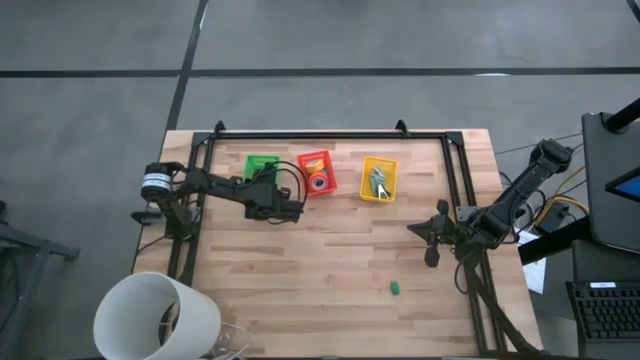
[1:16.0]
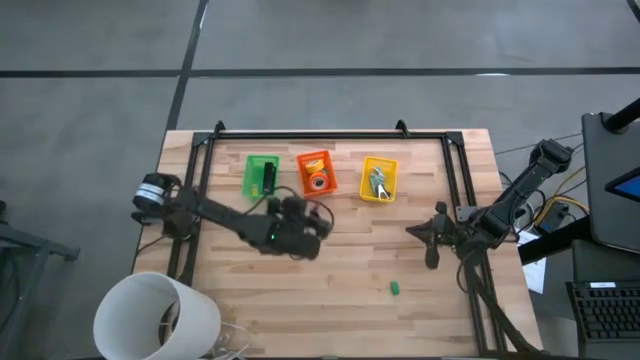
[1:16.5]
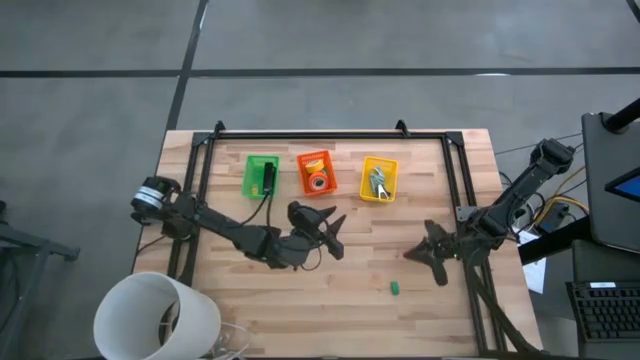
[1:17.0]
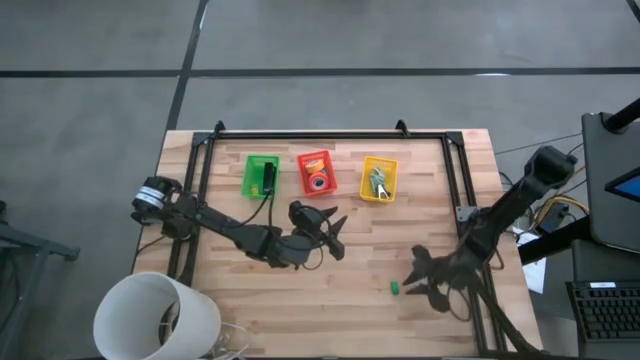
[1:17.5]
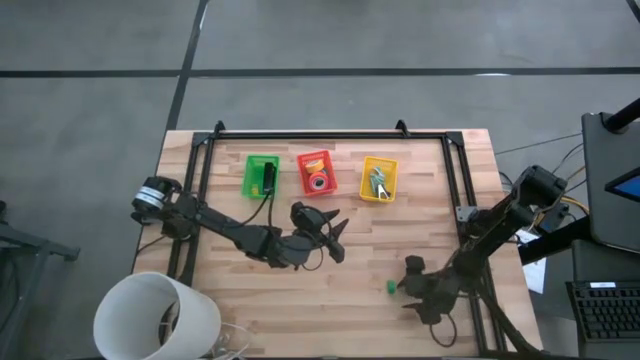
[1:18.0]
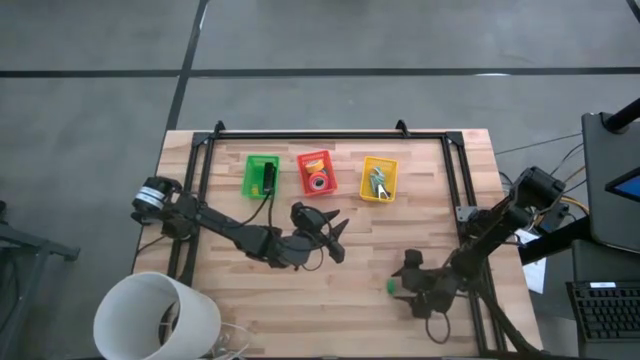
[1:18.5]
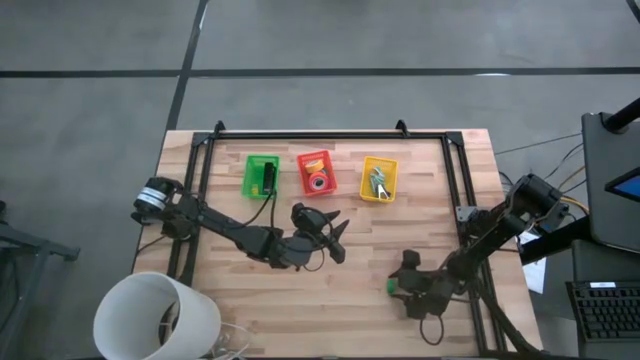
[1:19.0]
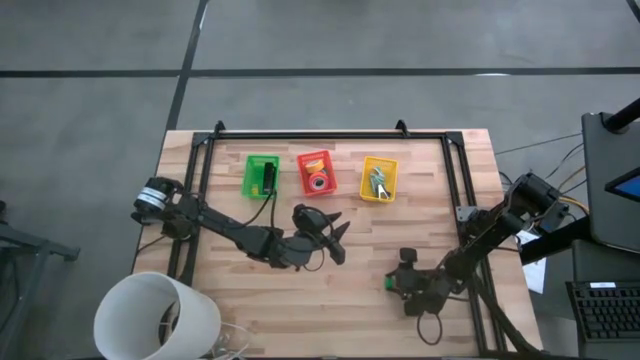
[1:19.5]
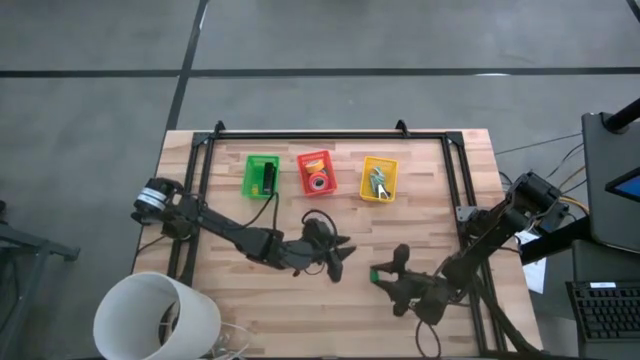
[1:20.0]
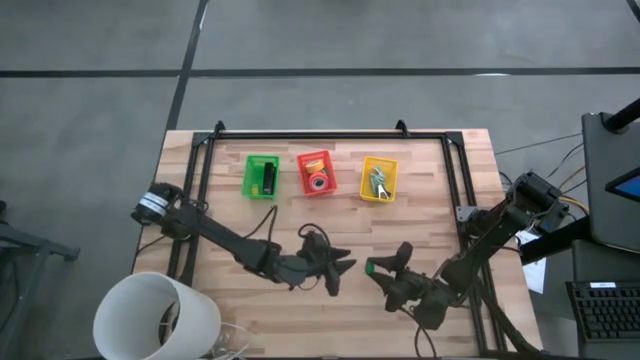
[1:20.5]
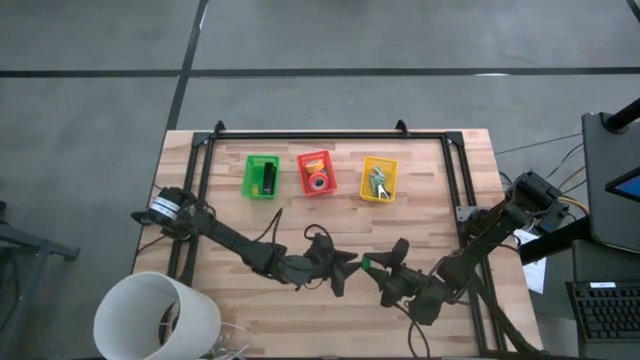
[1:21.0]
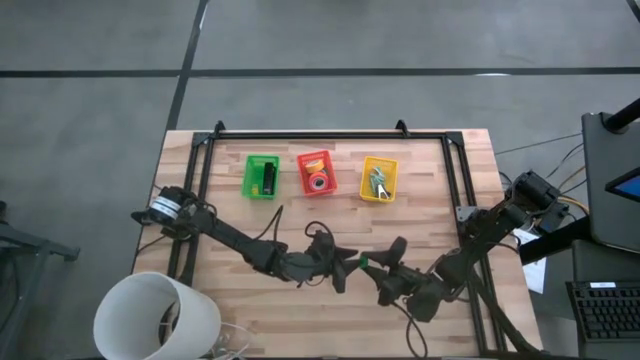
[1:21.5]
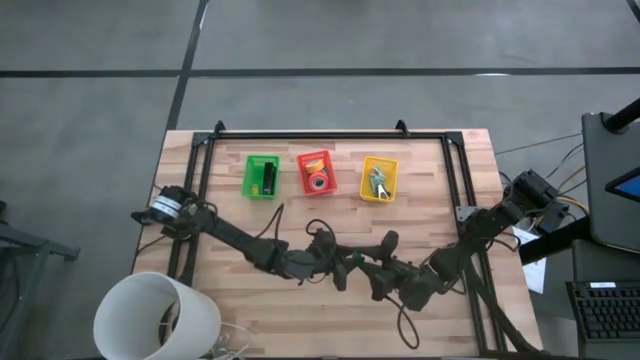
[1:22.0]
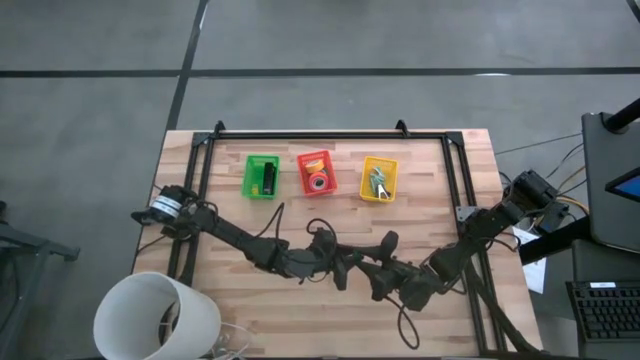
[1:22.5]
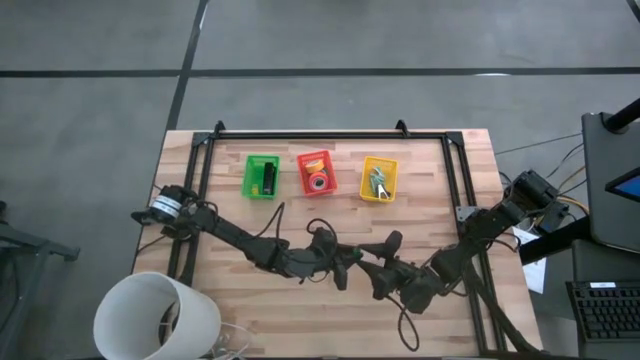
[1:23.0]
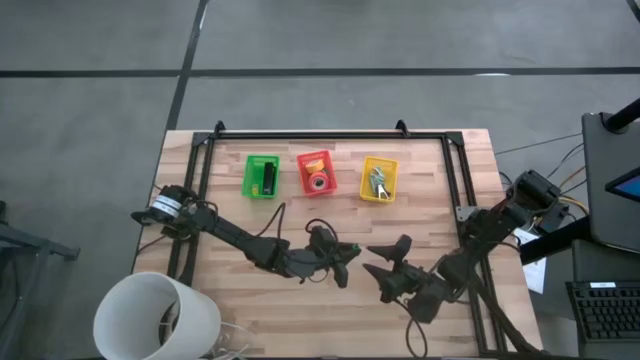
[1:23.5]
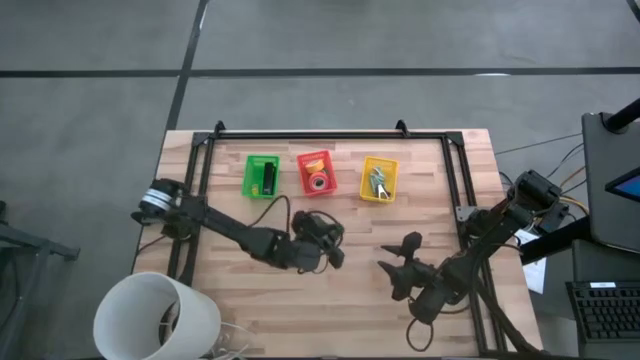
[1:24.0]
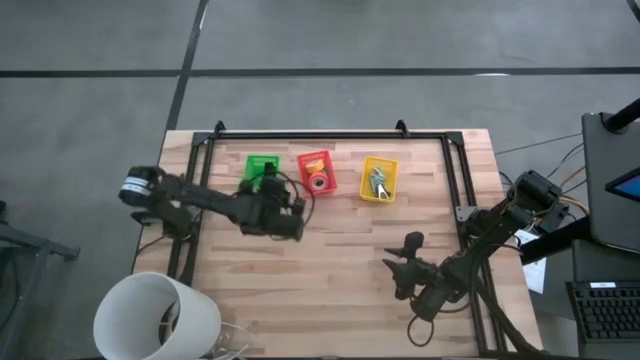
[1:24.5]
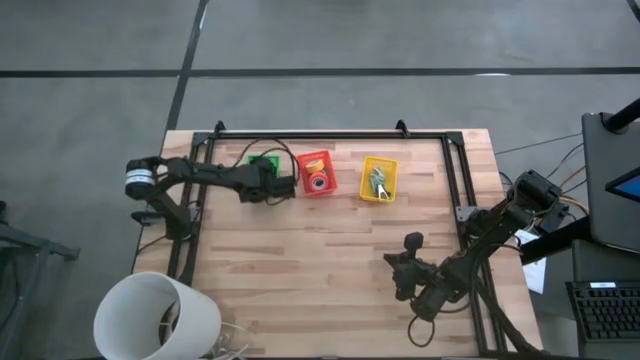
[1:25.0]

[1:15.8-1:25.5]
Task: Pick and place Stapler, Stapler remover, tape
Put the green stapler into the green bin

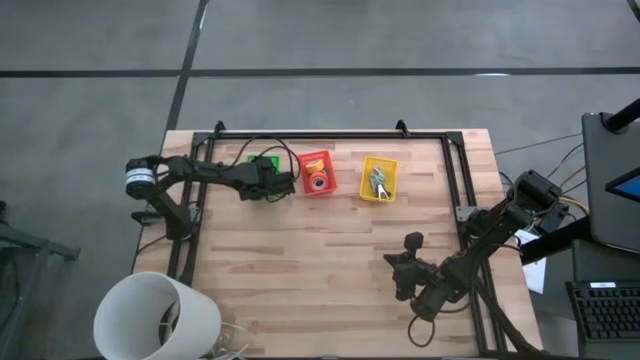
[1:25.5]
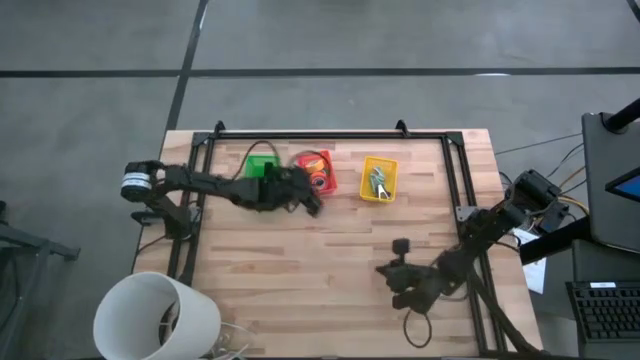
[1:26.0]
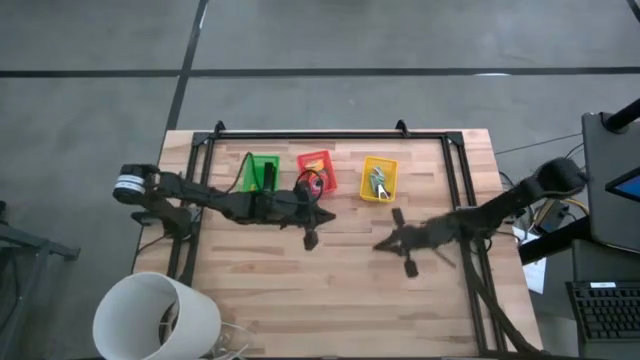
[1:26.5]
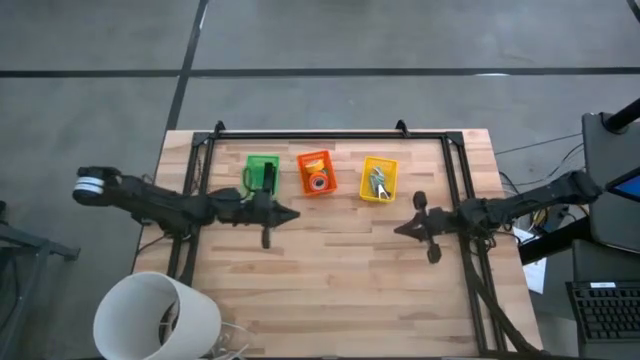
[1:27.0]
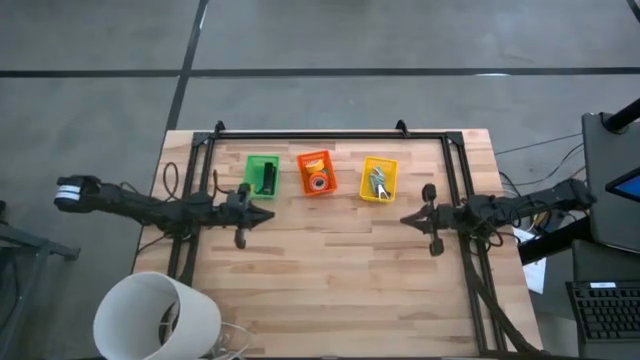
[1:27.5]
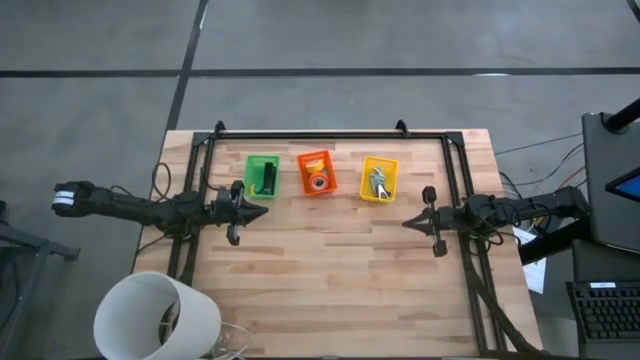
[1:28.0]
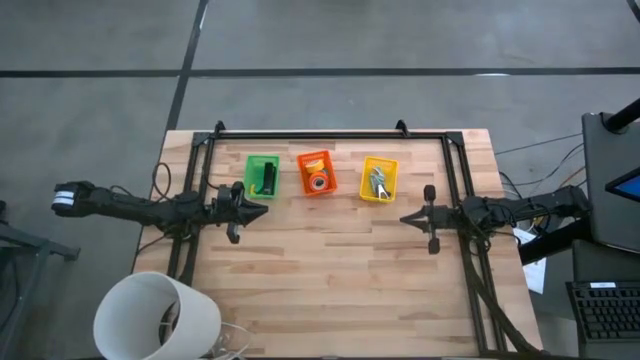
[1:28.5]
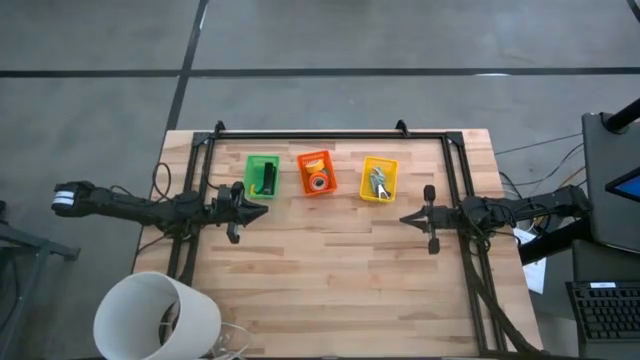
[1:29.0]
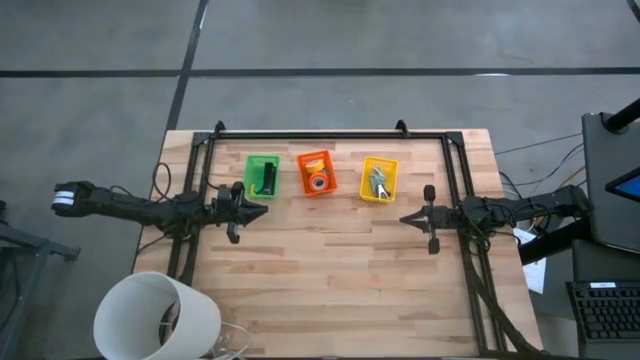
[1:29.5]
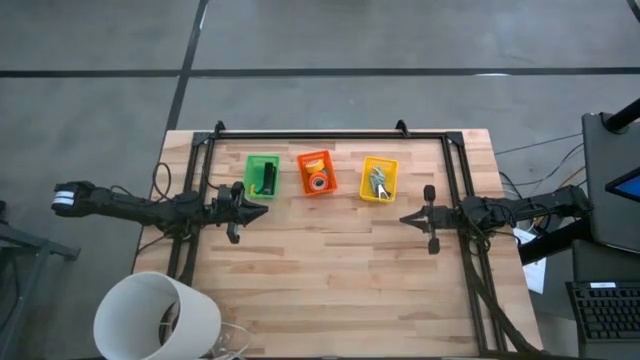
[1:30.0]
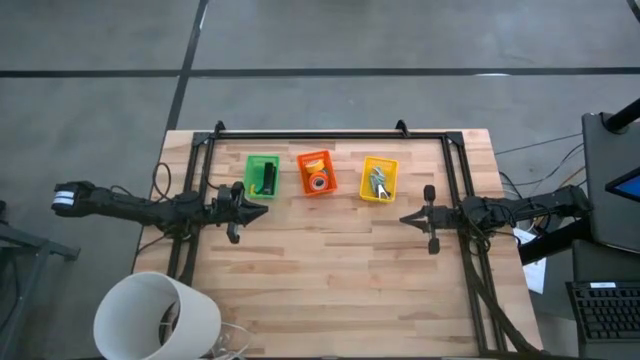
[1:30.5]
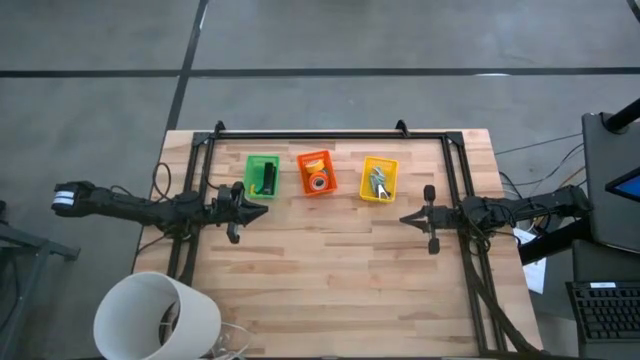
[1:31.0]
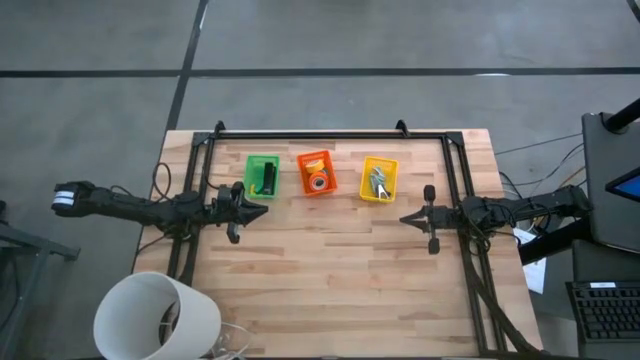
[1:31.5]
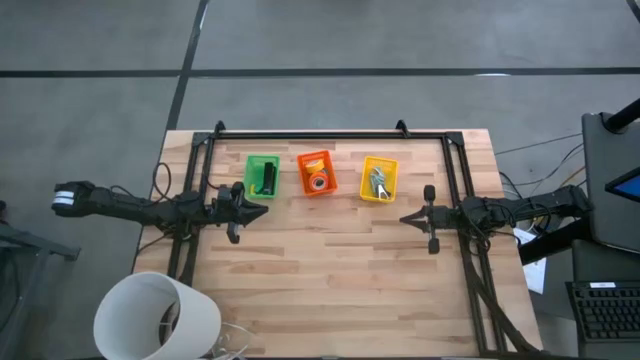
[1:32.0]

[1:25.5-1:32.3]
Return to Home Position

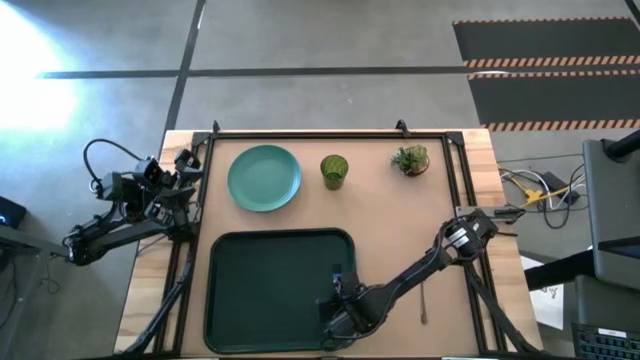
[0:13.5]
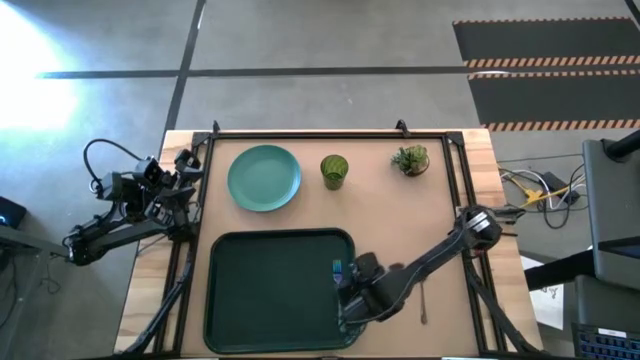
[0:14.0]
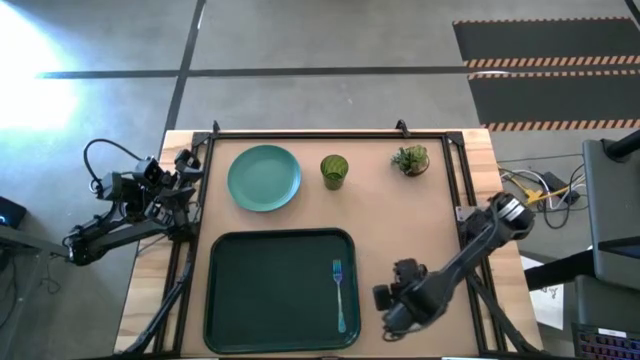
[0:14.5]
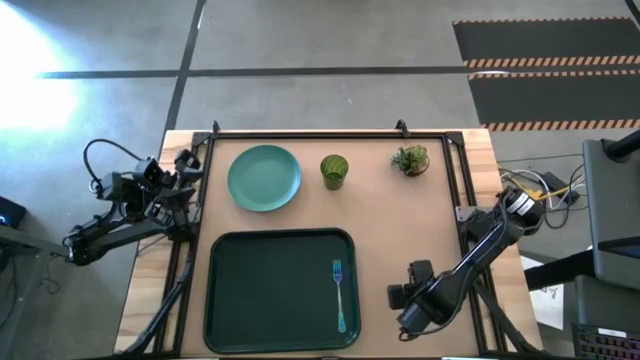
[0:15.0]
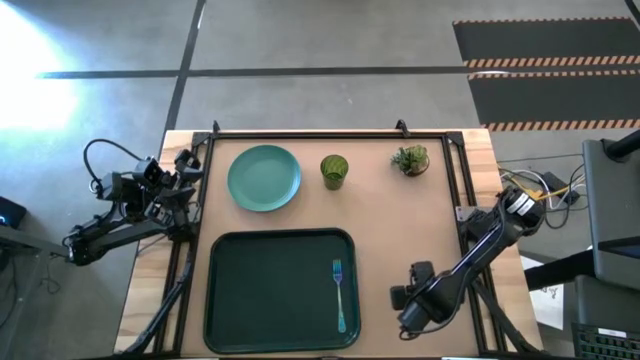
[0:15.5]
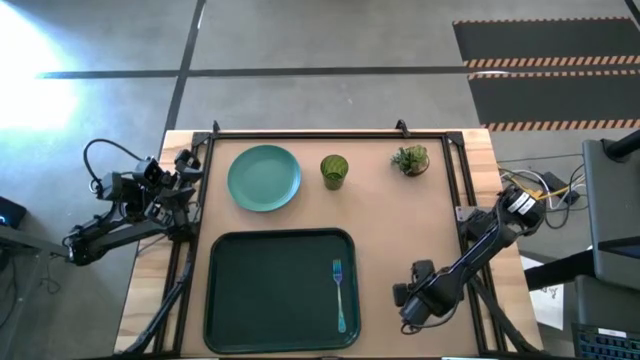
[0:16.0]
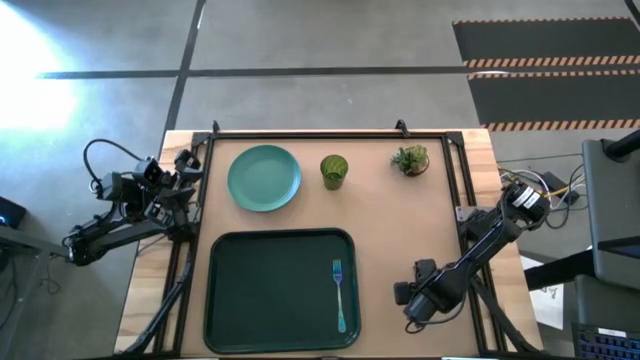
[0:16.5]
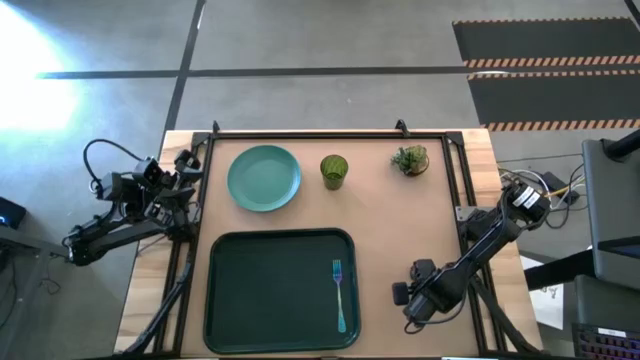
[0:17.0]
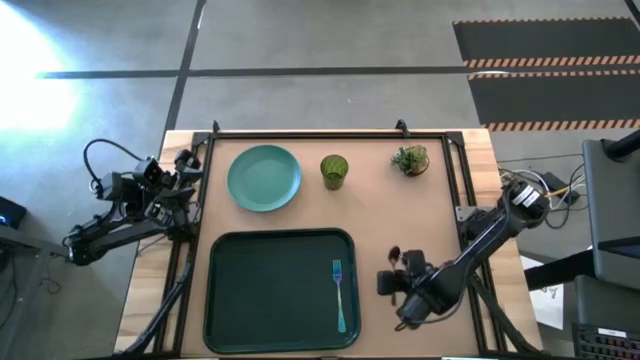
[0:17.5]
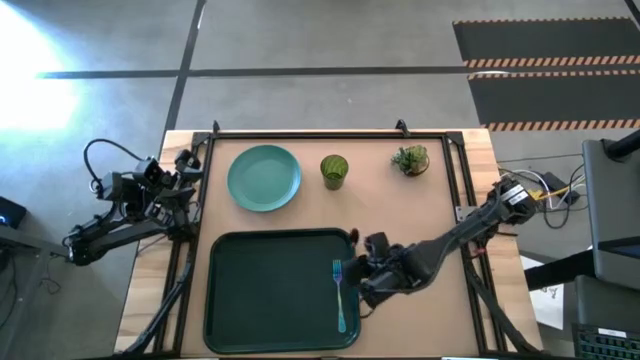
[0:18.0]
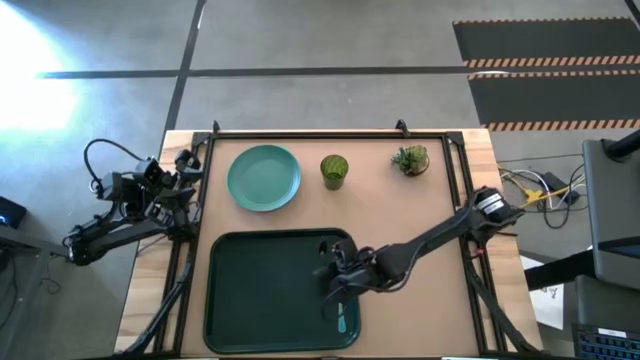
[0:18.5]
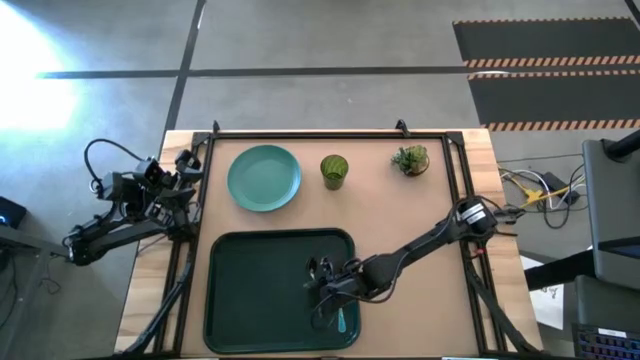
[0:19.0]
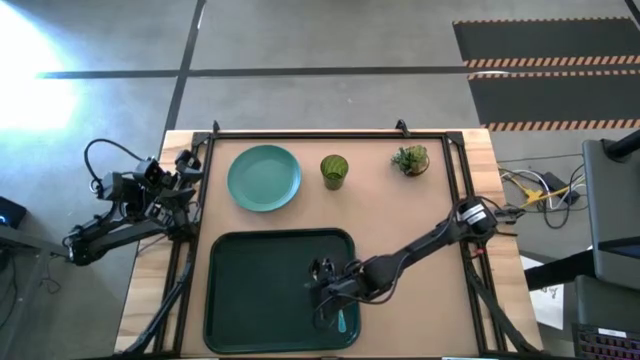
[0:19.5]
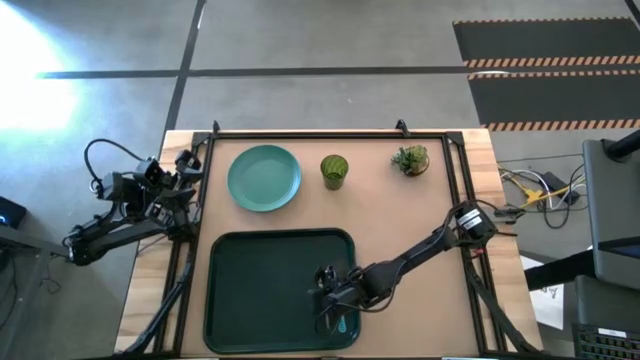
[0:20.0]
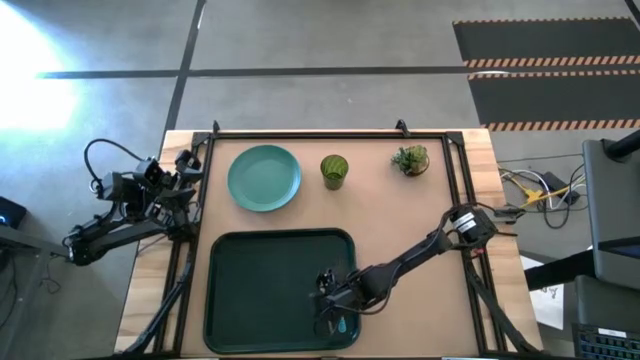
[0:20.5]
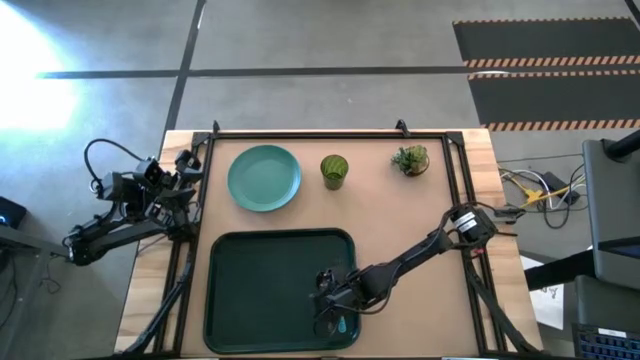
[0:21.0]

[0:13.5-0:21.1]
Task: Pick and place plate/cup/fork/spoon on tray
Put the spoon on the serving tray
